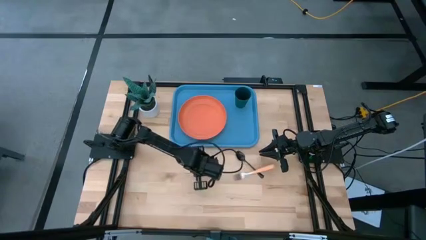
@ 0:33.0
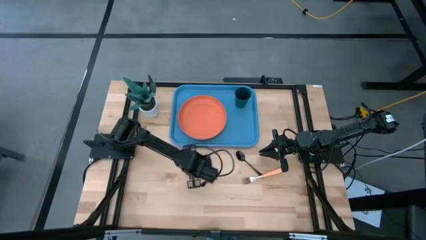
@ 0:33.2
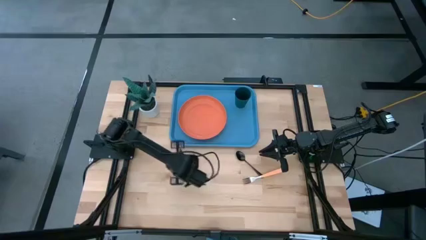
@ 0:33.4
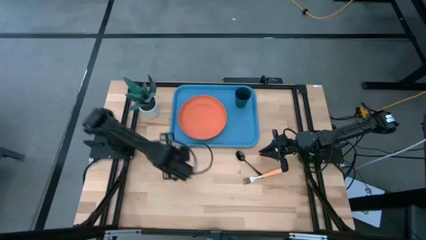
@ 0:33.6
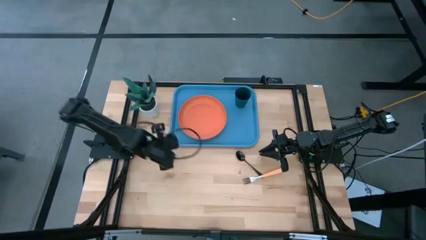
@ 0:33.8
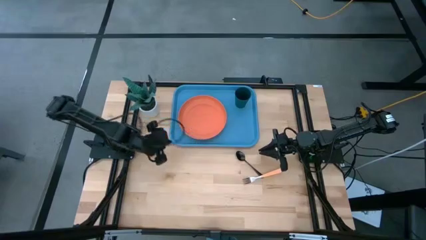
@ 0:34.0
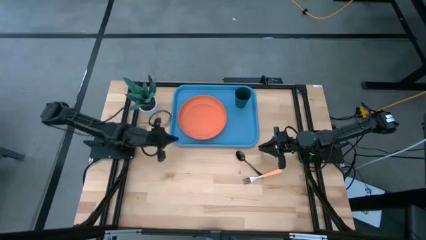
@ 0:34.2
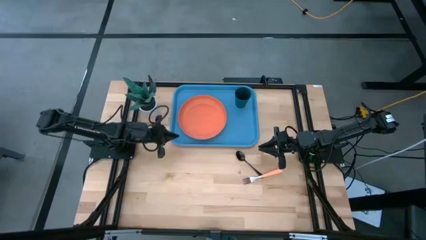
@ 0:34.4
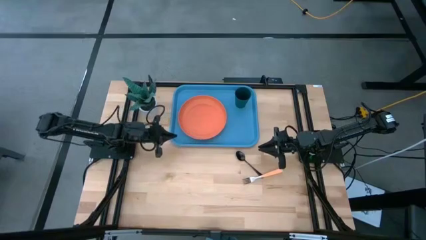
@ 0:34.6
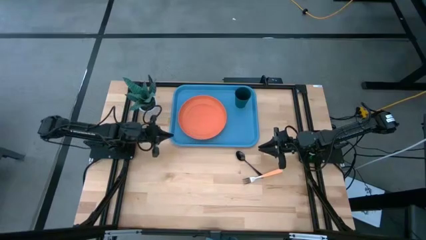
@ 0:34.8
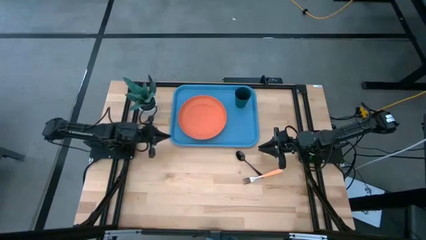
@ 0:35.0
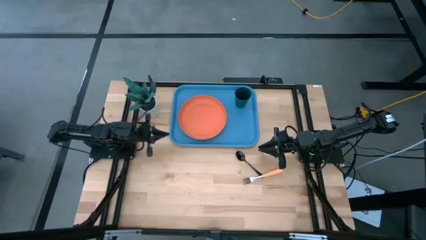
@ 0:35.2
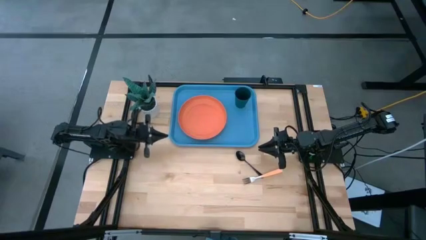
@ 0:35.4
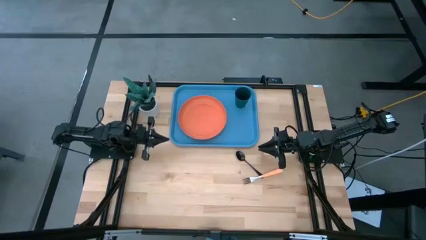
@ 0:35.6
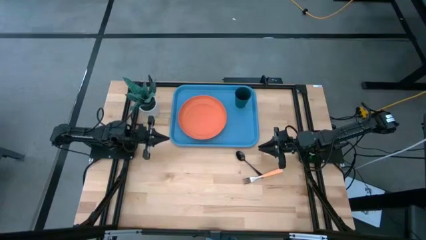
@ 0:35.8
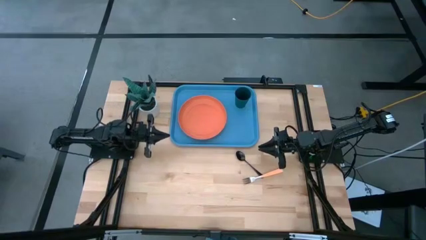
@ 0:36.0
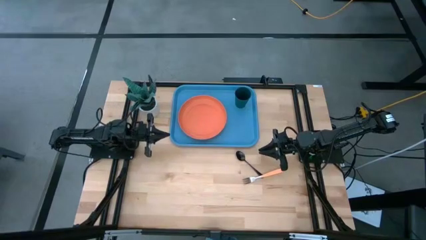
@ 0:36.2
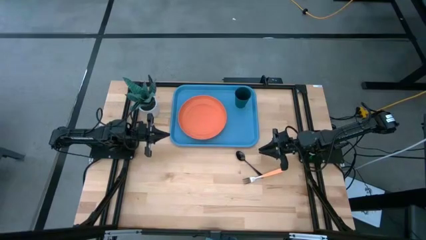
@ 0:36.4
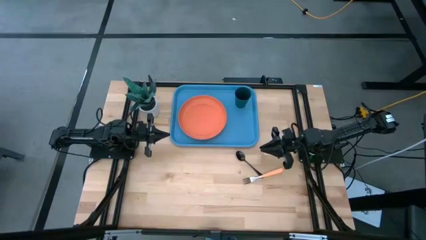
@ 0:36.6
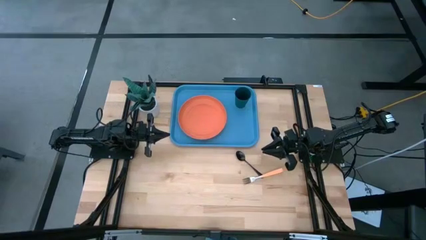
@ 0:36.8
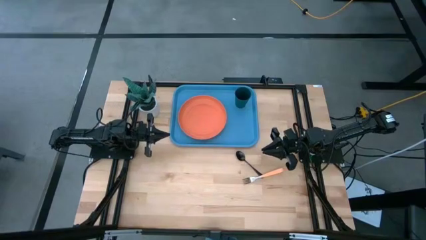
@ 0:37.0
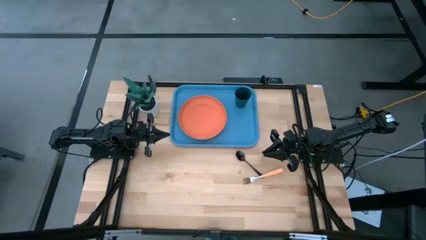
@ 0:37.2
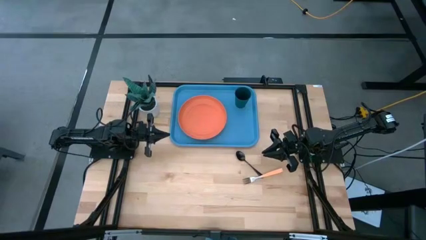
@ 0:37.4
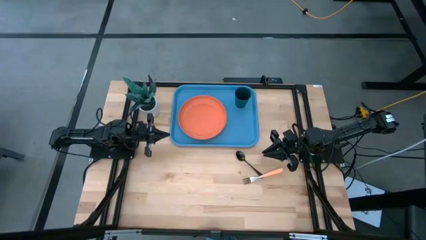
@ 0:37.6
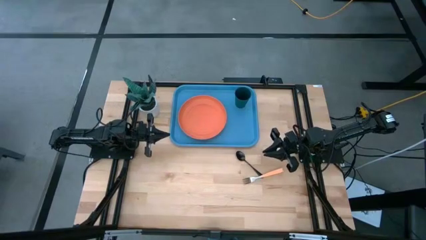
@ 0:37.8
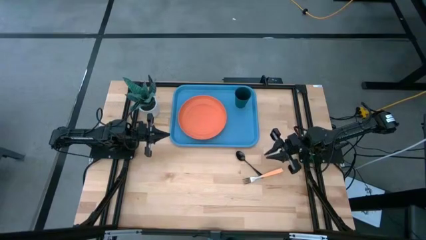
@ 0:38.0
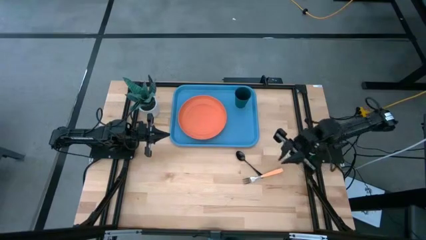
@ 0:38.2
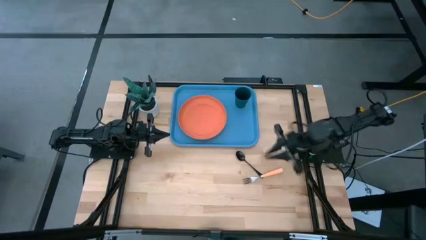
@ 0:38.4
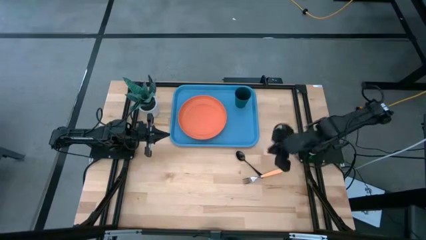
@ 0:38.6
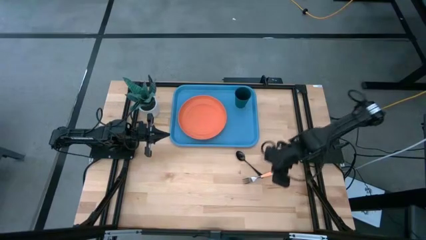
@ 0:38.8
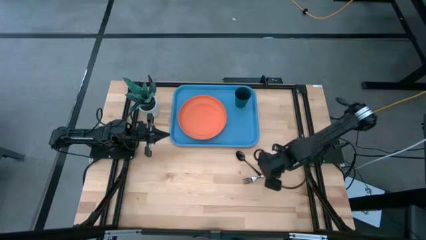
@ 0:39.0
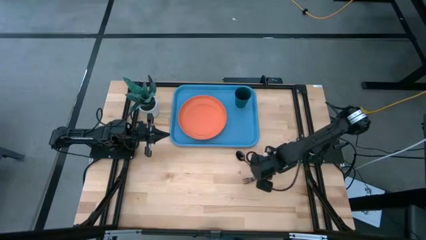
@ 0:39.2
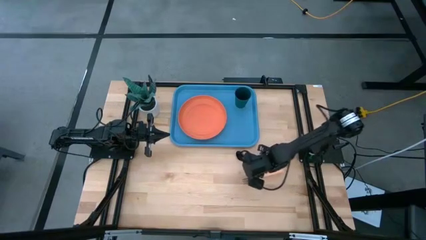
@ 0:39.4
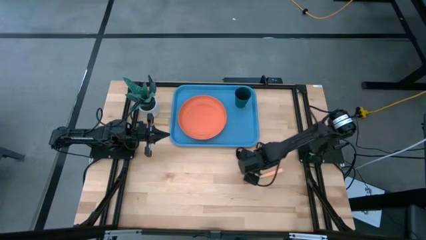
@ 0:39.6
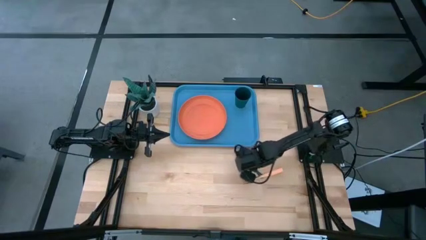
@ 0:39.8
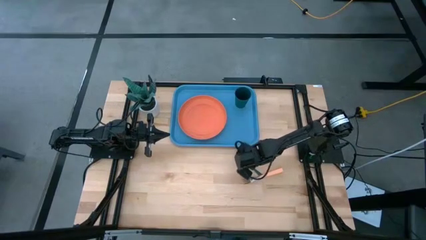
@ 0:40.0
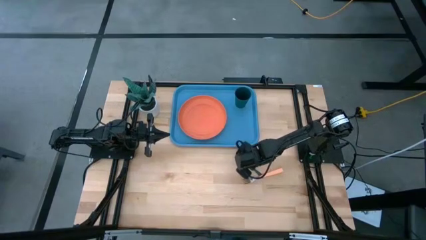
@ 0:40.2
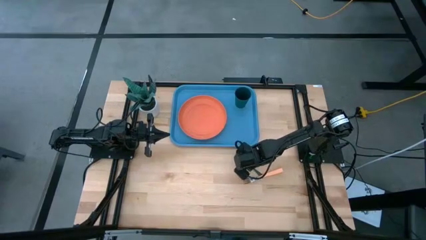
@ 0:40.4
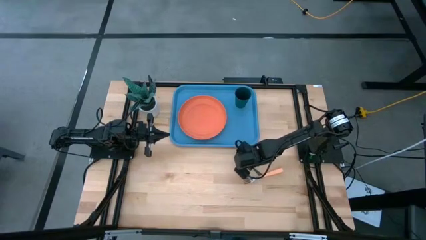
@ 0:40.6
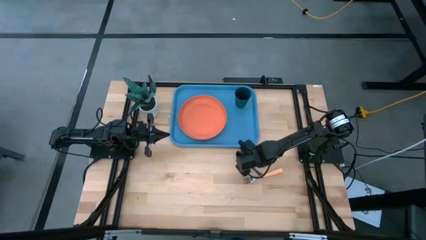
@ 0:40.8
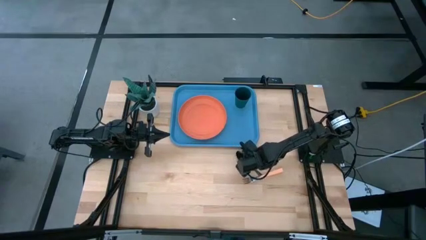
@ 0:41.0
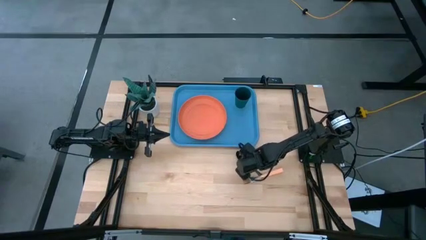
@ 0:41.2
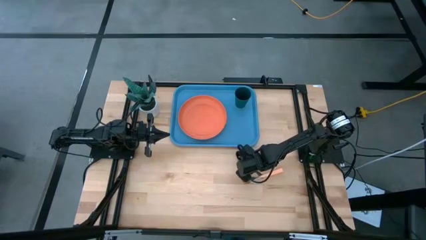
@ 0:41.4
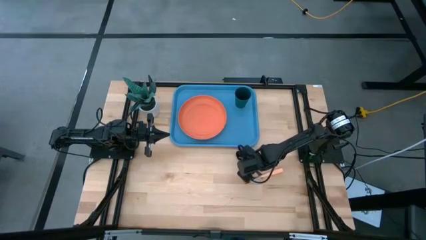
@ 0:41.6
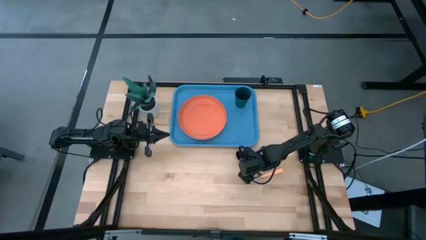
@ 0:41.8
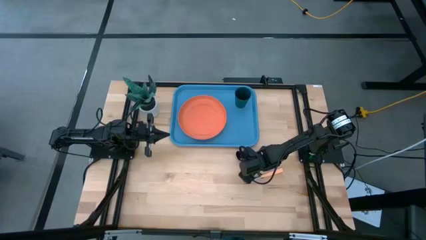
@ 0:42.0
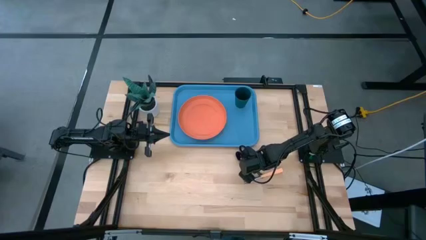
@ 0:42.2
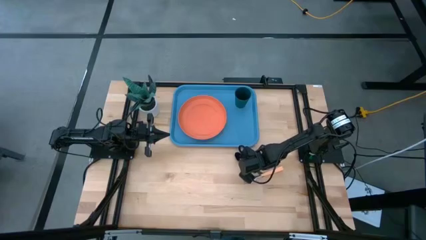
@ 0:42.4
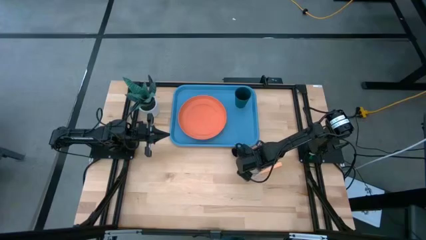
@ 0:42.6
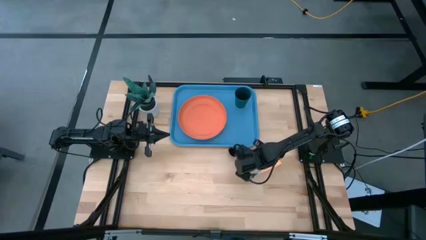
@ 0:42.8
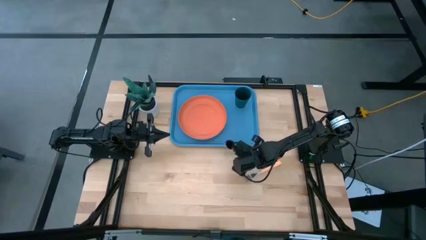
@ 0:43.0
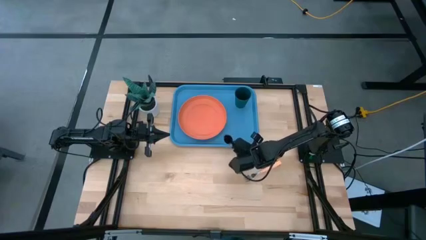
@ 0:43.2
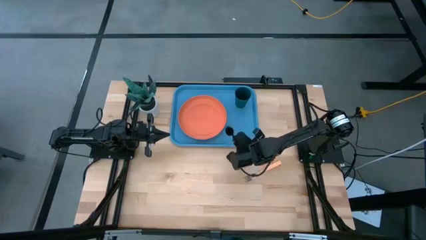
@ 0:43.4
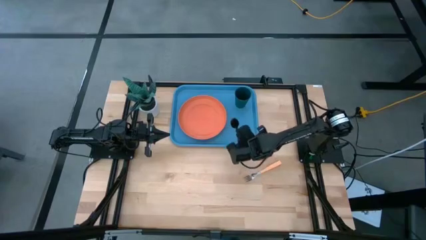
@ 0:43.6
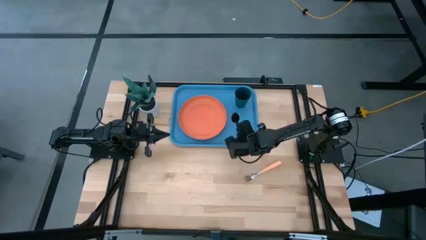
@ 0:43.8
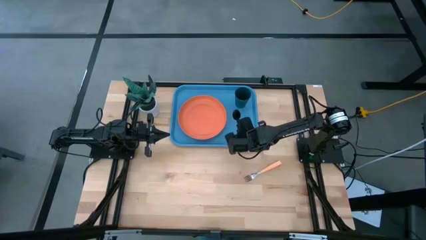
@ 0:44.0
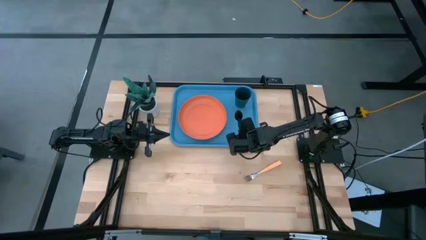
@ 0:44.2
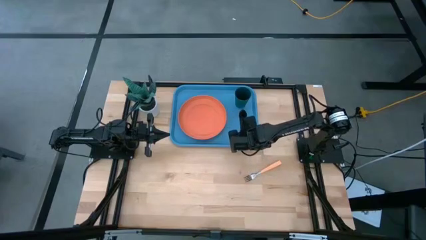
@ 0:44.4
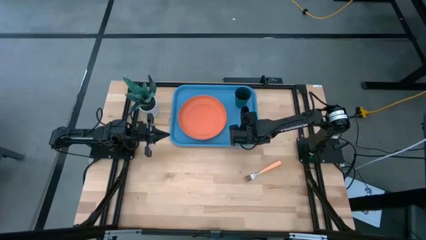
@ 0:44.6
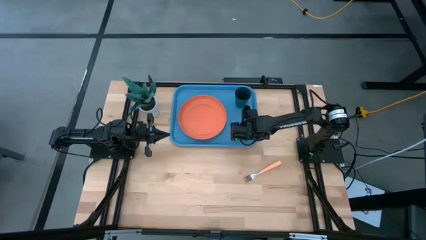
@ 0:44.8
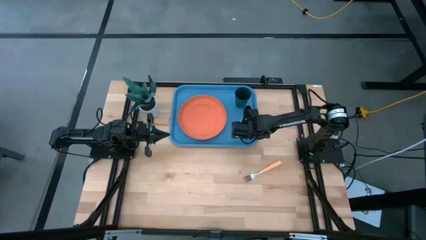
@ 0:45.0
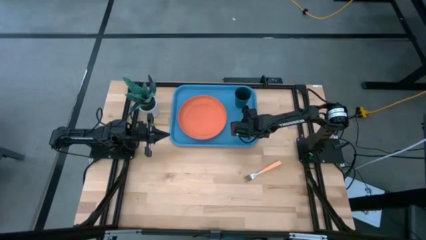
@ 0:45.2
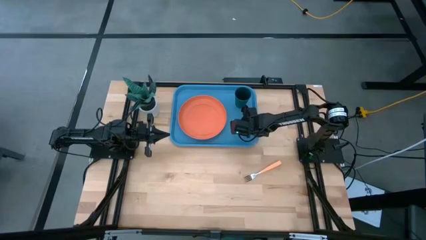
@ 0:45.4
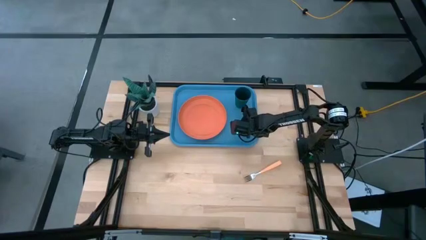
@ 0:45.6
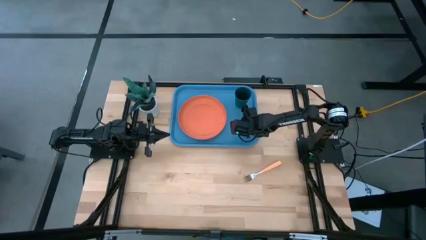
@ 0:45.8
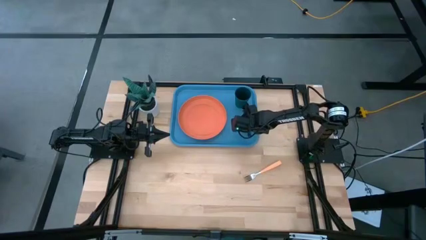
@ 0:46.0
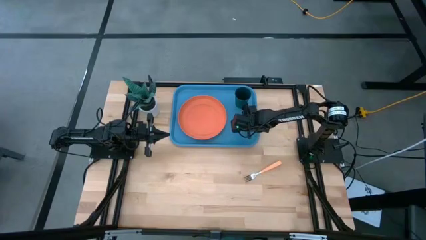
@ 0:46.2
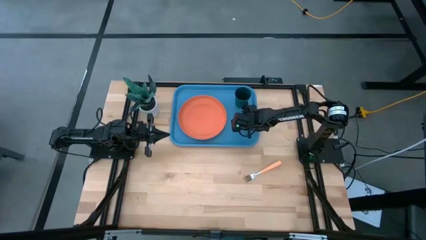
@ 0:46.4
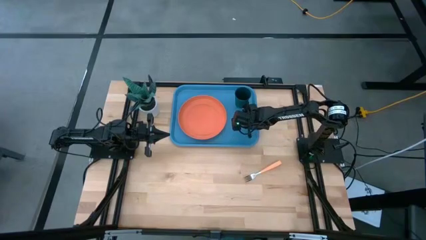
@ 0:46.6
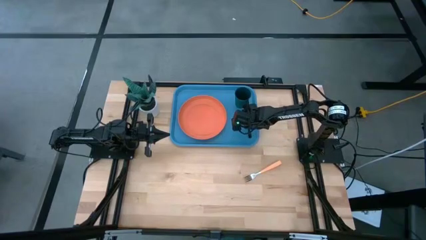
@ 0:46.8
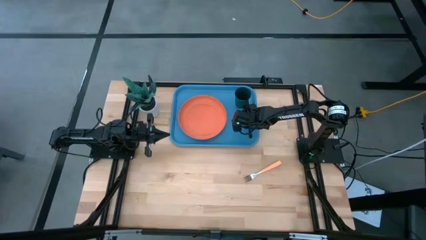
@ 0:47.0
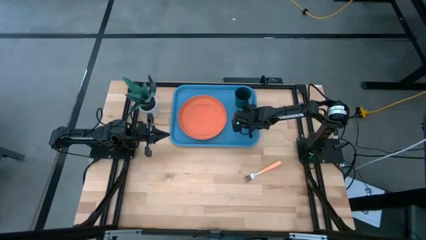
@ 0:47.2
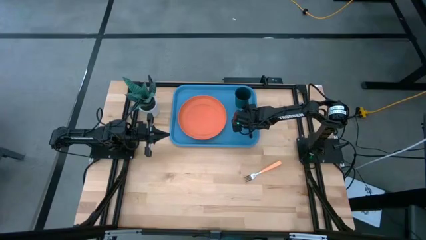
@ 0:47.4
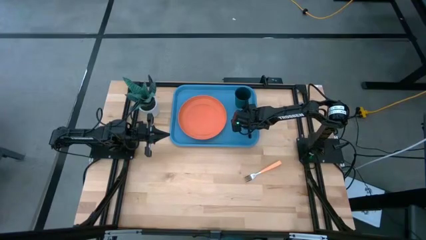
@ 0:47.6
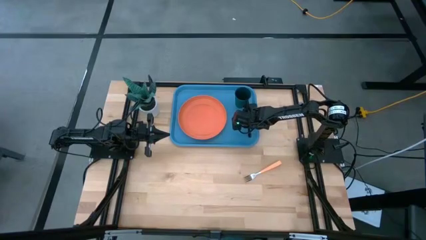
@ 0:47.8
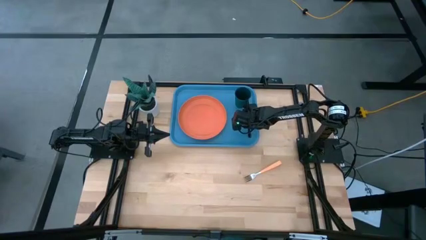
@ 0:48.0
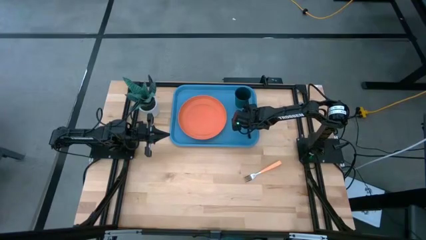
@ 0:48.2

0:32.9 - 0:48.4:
Task: Pick and place plate/cup/fork/spoon on tray
Put the black spoon on the blue tray

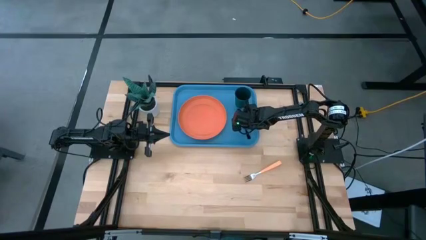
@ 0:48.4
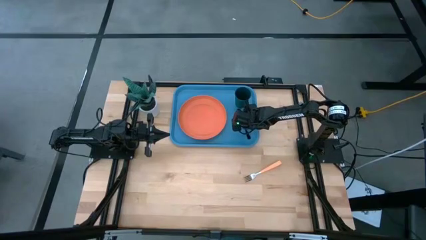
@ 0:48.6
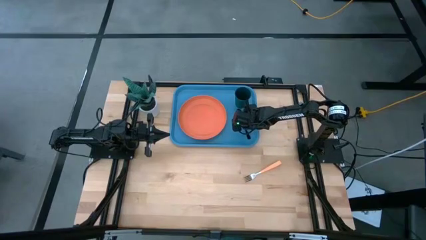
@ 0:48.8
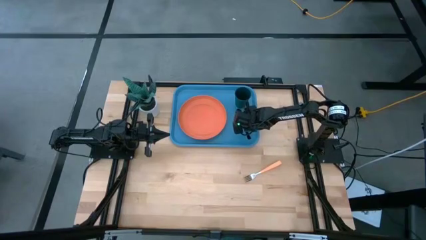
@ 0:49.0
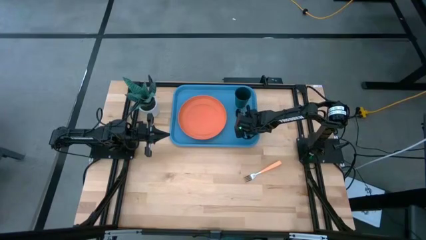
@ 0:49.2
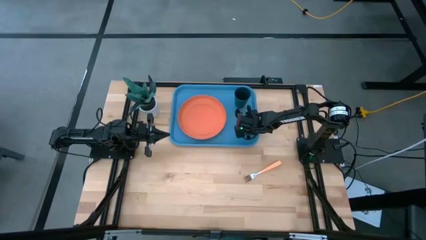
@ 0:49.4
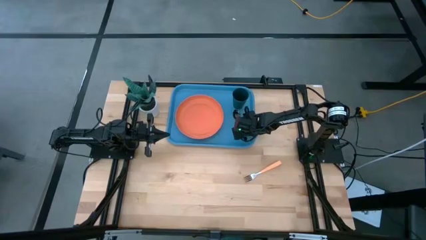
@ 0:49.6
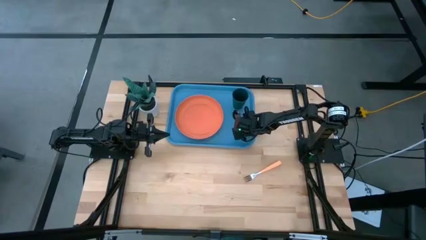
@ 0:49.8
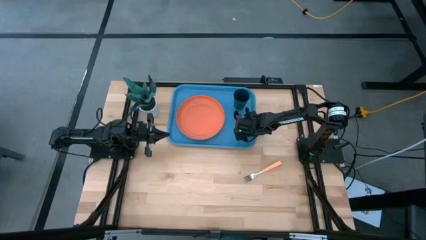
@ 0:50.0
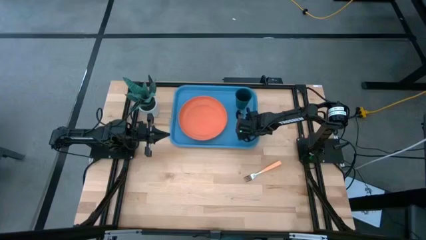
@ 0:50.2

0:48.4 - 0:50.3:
Adjust the blue tray on the table
